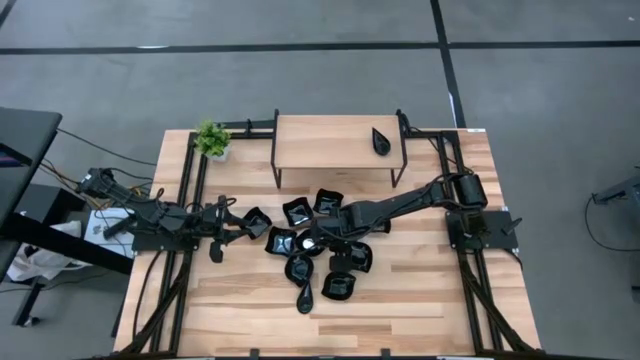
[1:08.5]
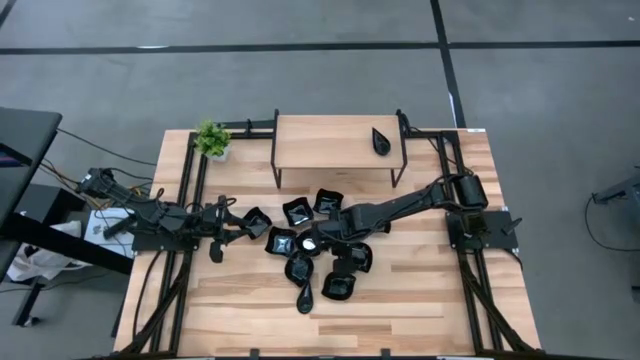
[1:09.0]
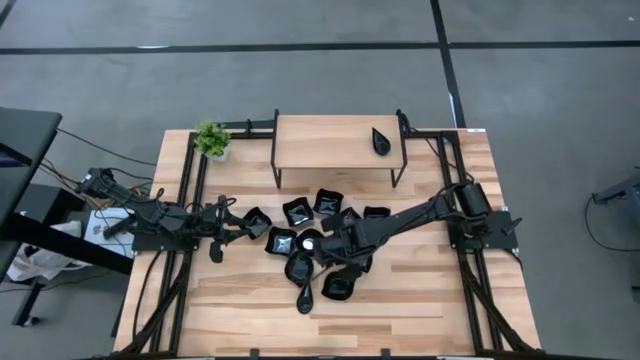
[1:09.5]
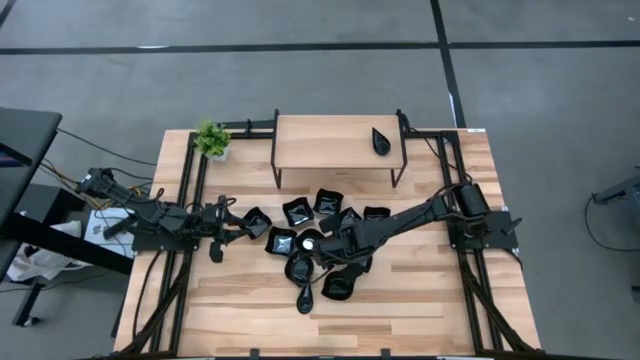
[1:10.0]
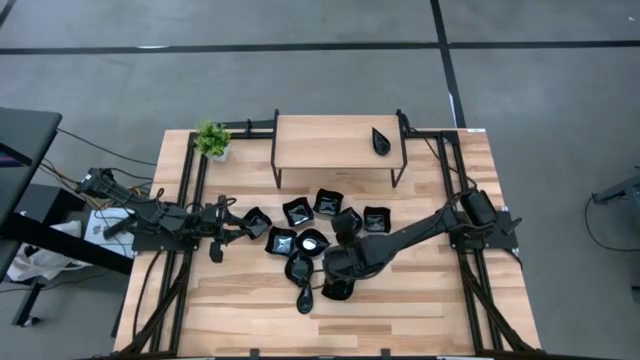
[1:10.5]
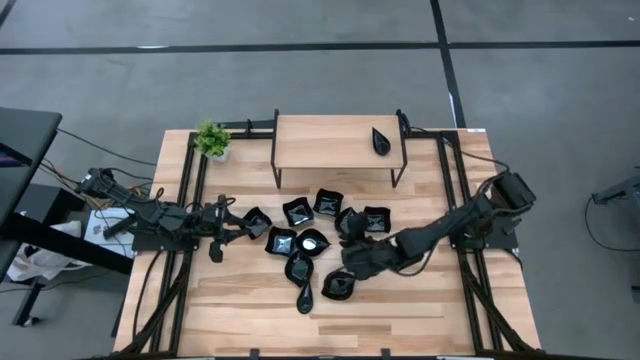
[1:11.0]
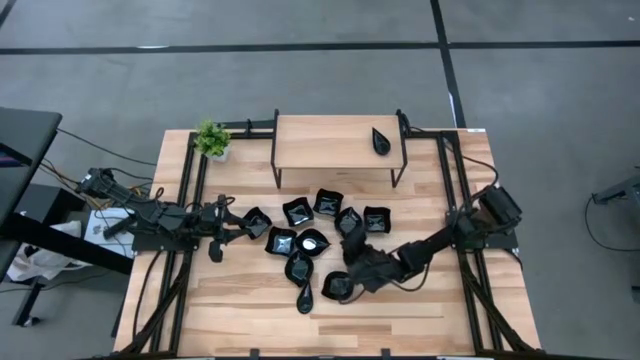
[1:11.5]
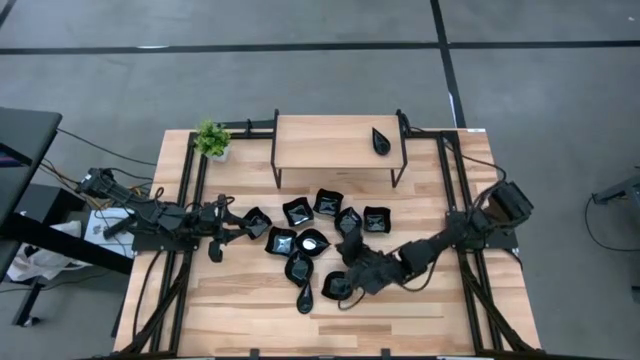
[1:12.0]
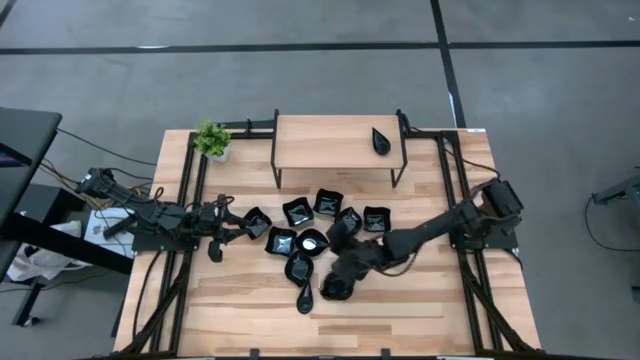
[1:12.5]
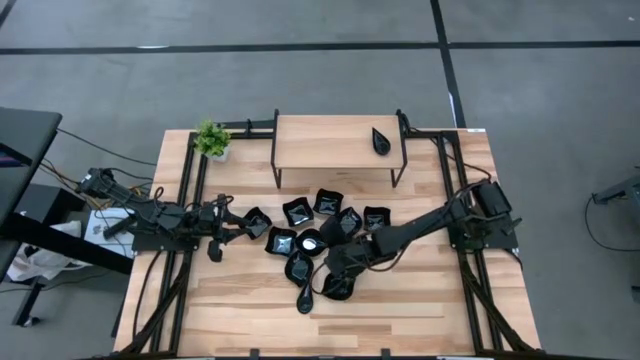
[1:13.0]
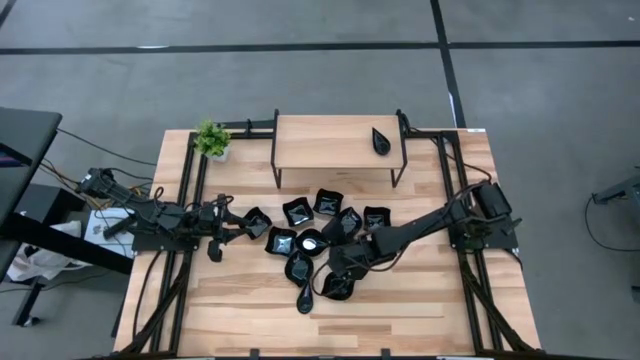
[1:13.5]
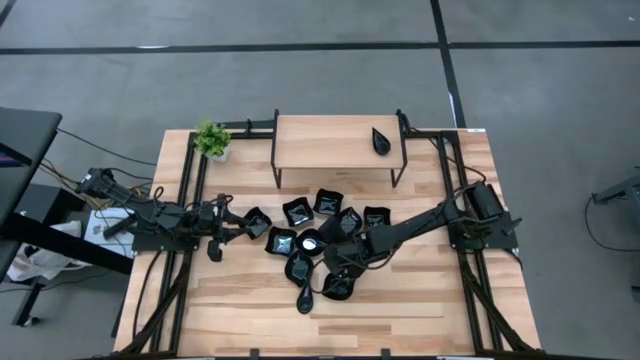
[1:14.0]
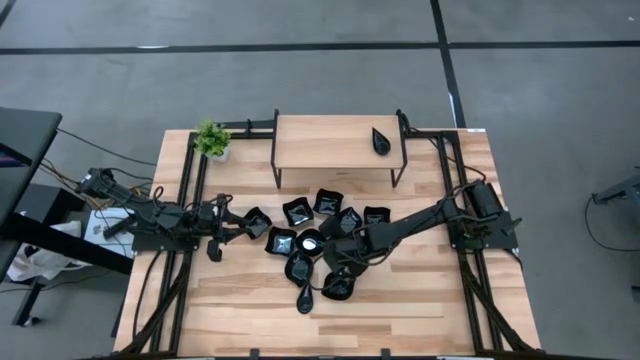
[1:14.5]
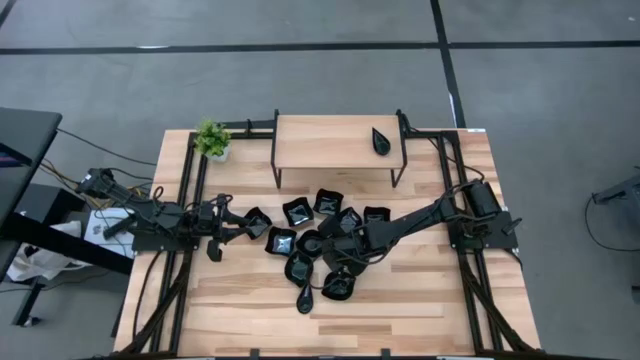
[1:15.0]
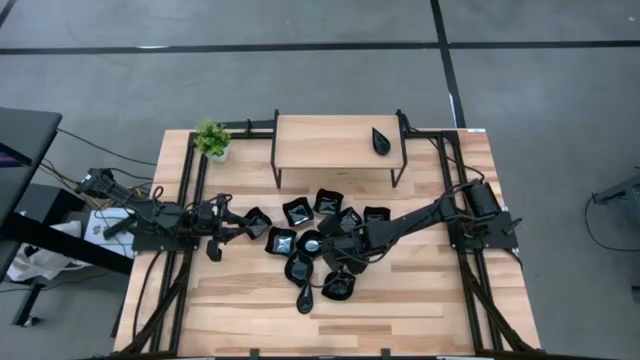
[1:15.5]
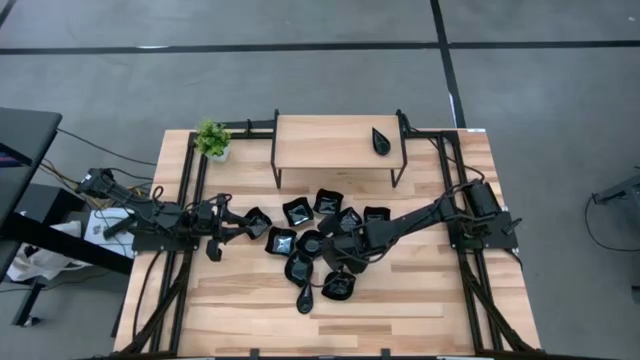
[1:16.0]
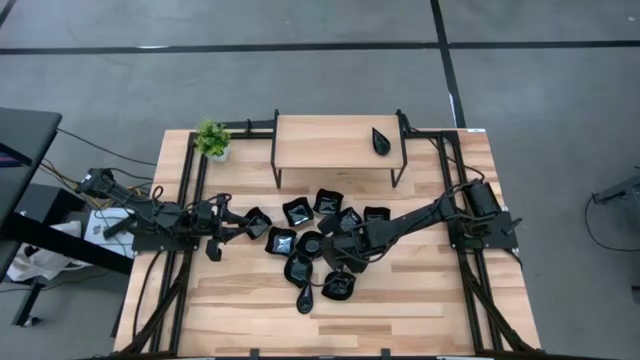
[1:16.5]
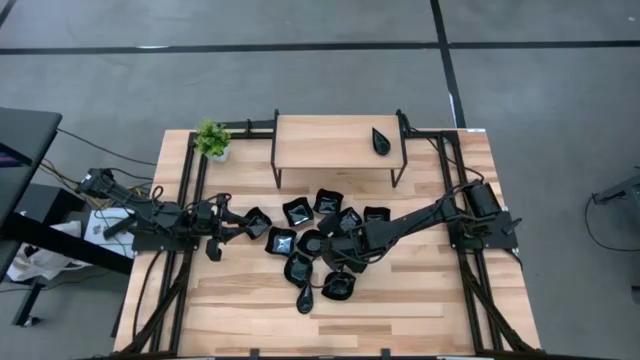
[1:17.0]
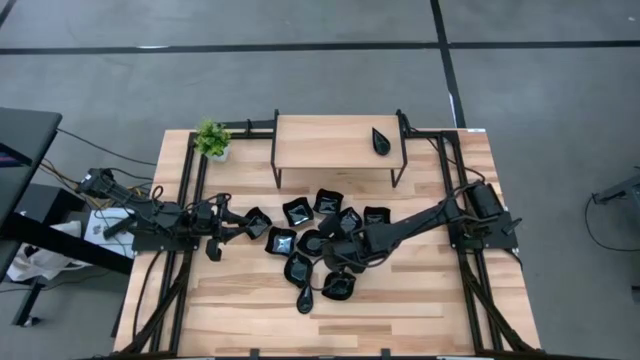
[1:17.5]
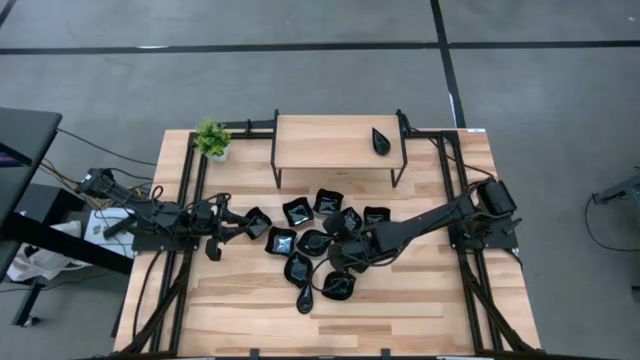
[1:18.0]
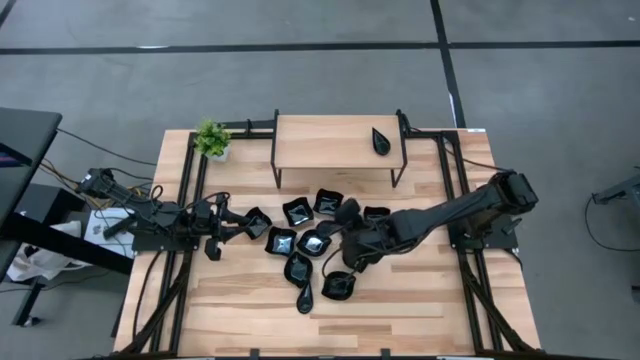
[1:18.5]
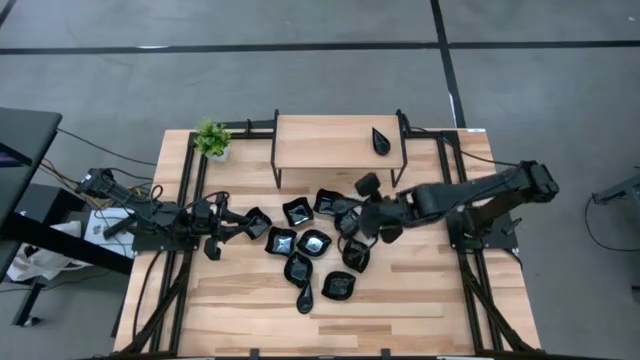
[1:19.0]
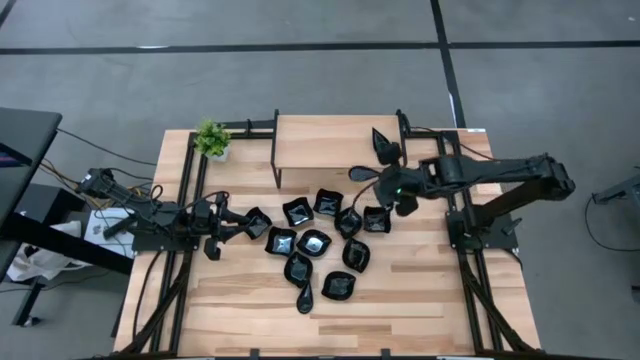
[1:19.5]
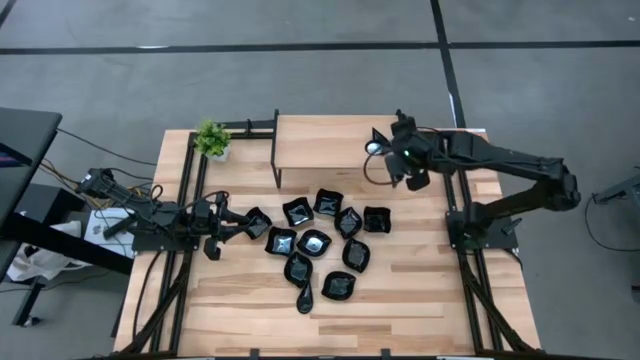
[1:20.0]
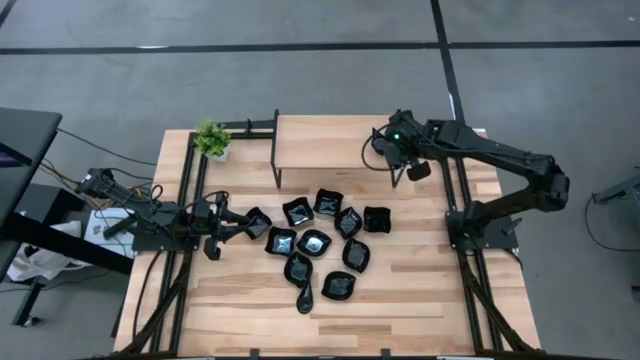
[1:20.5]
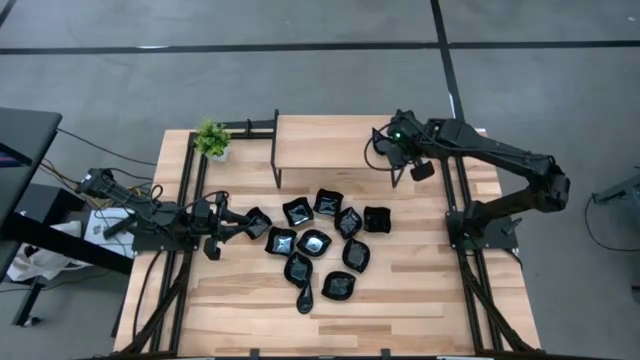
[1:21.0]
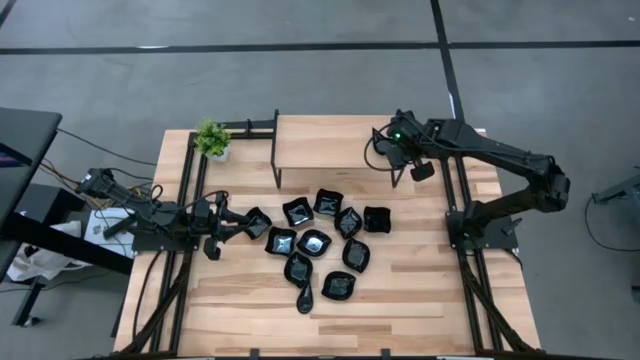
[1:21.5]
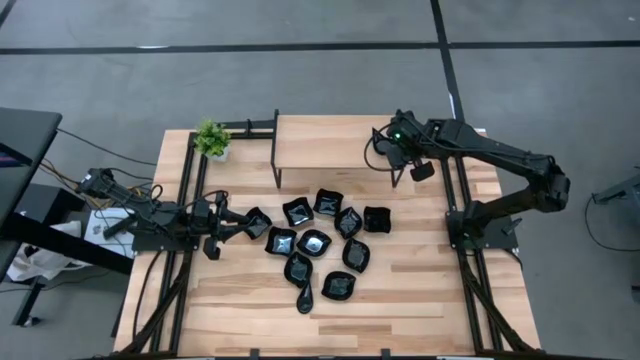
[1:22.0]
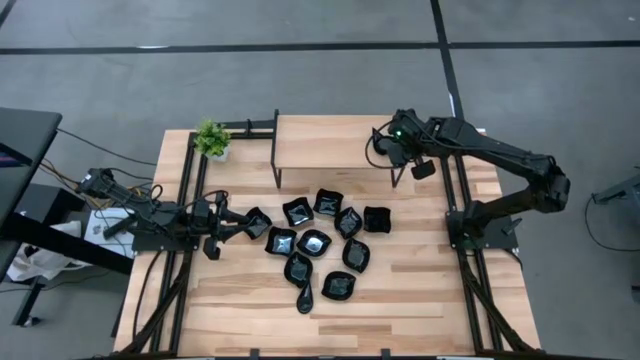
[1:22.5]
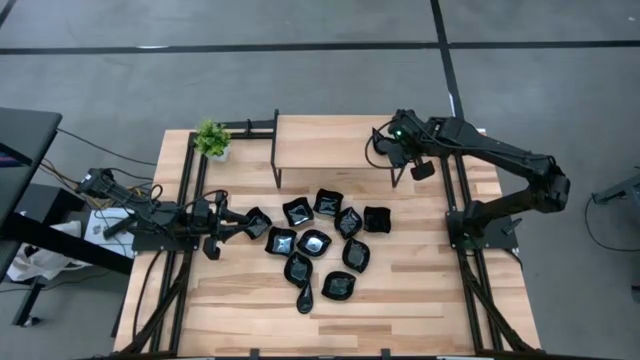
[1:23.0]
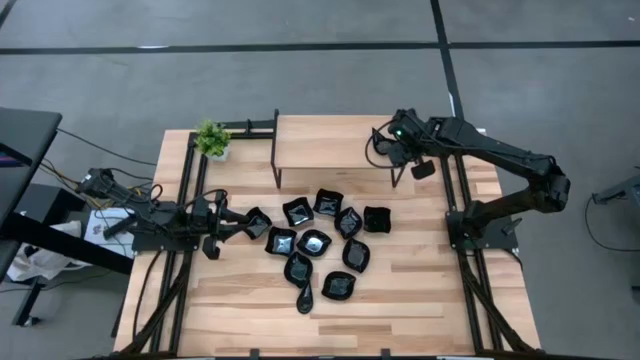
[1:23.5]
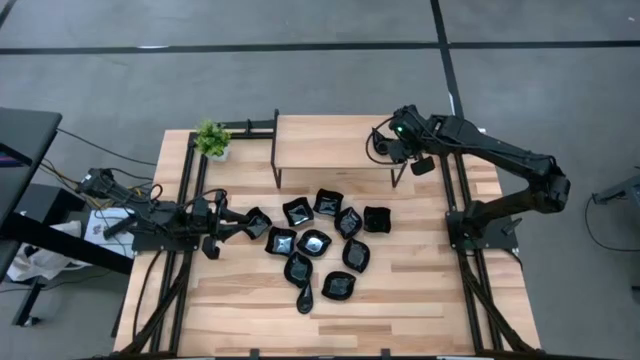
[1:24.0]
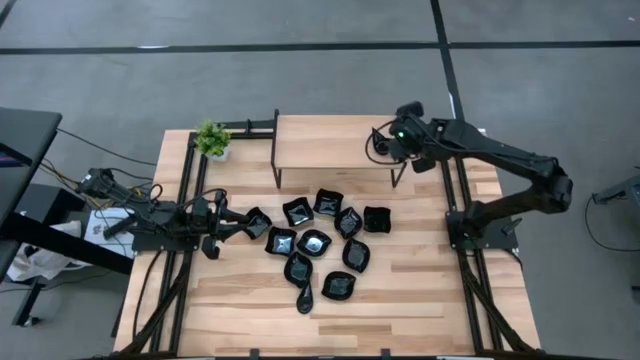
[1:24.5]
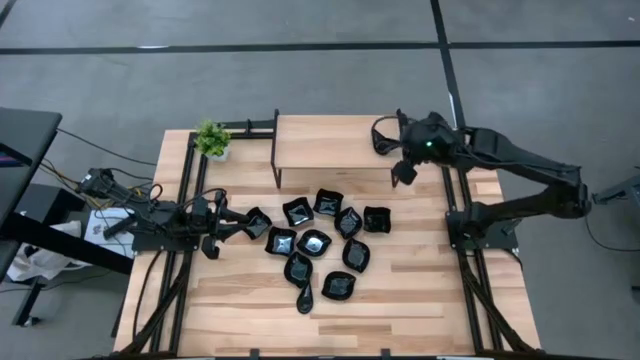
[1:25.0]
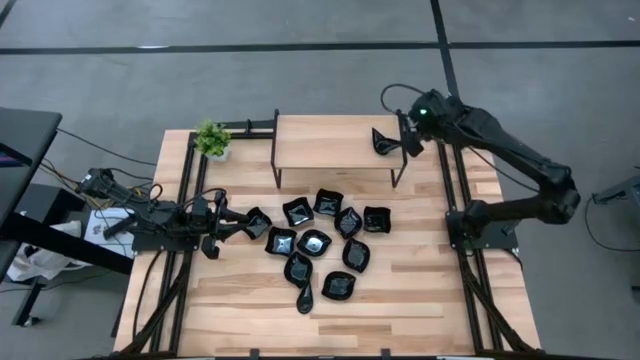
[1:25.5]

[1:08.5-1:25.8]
Task: Pick & Place Mini shaped plates
Stack the black drop shaped plate on top of the black drop shaped plate on the shelf

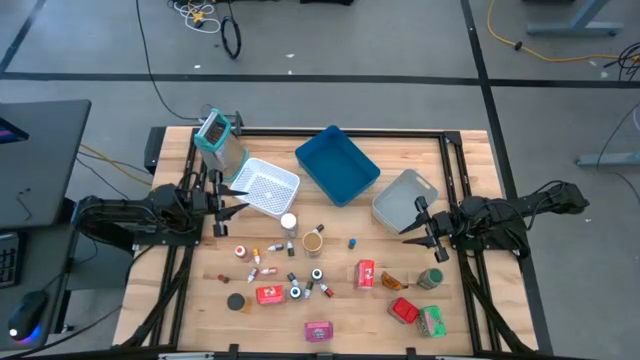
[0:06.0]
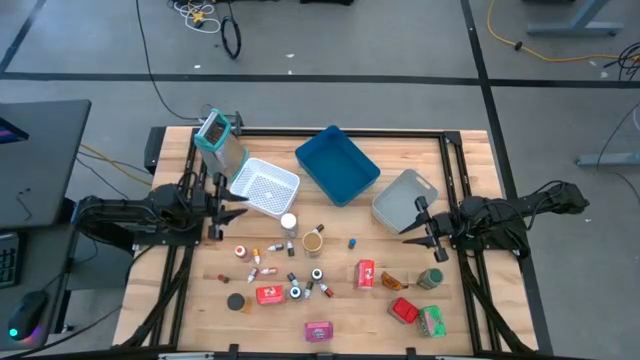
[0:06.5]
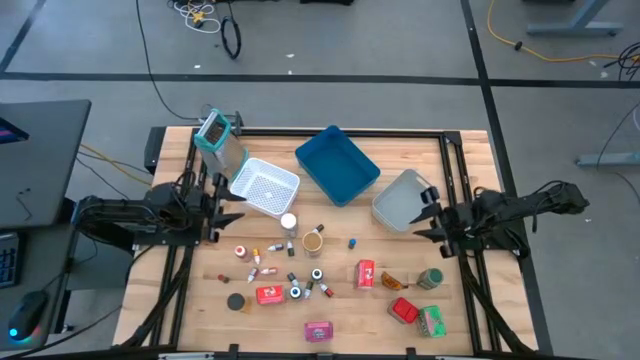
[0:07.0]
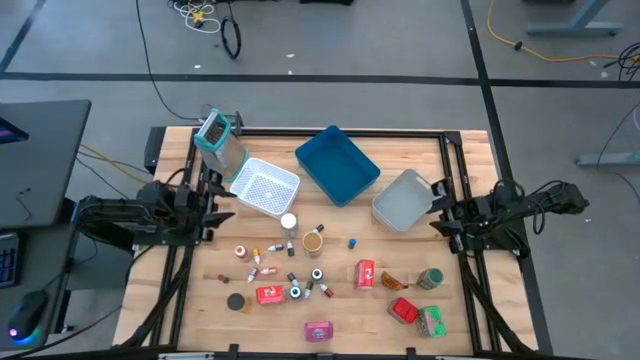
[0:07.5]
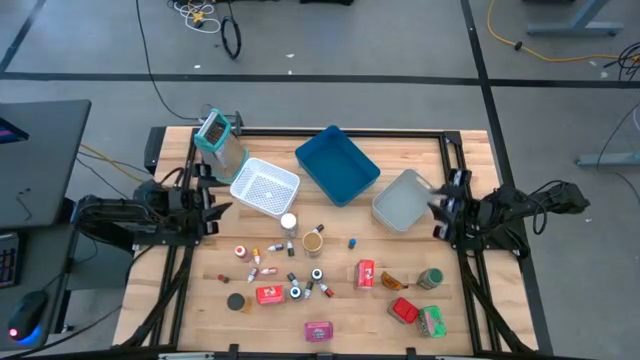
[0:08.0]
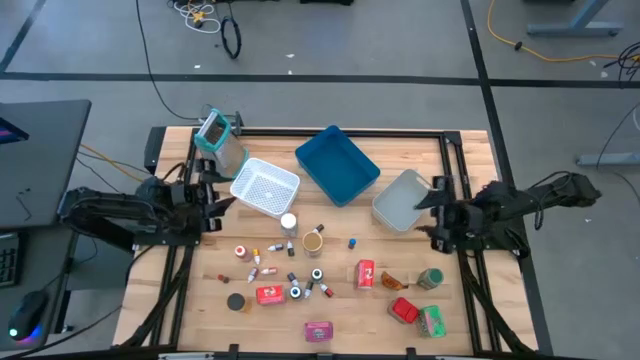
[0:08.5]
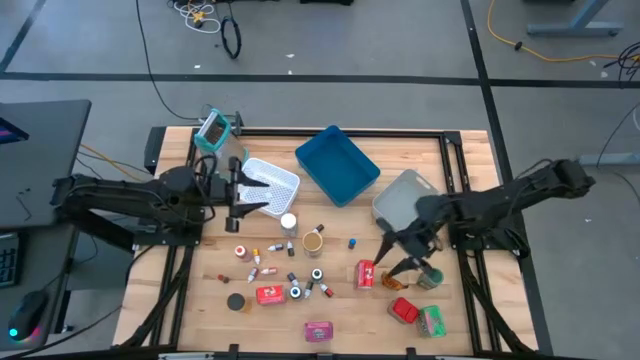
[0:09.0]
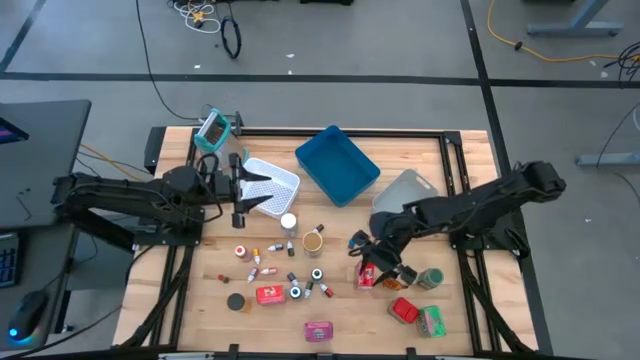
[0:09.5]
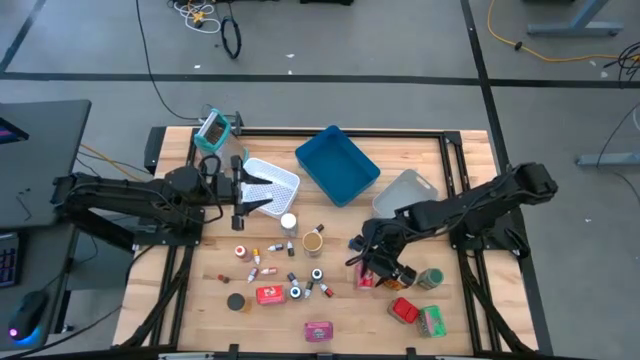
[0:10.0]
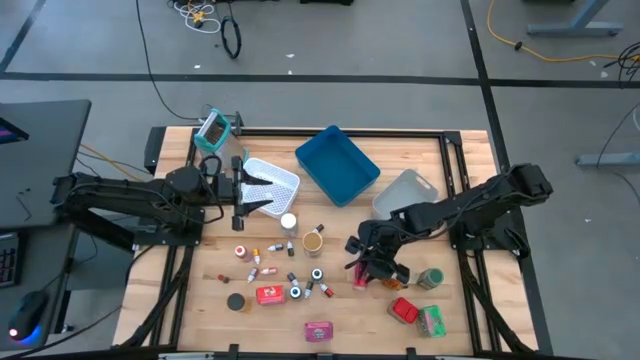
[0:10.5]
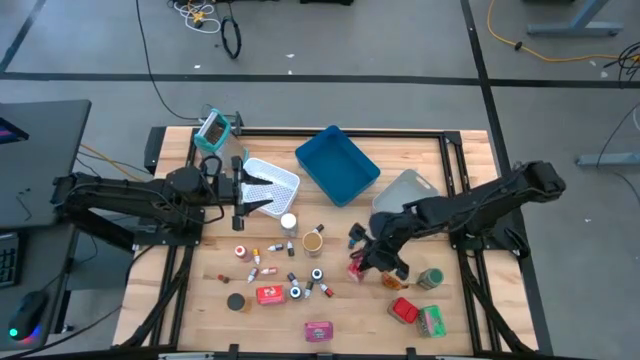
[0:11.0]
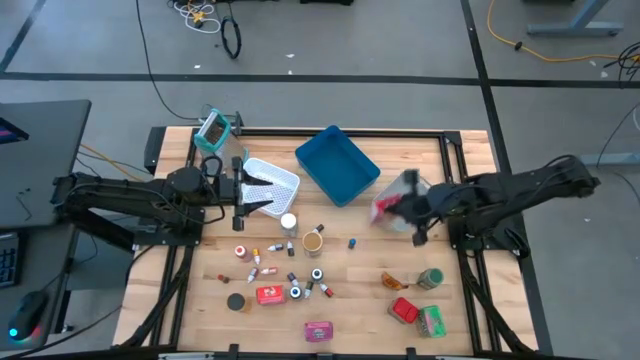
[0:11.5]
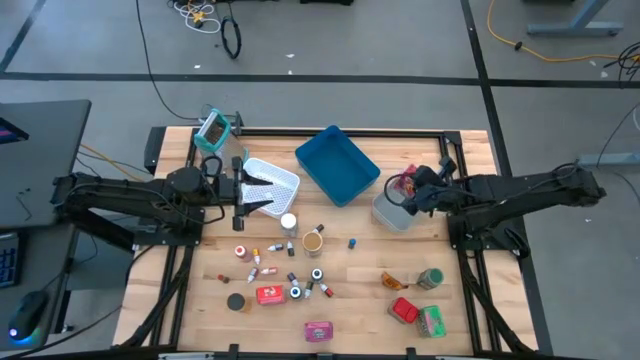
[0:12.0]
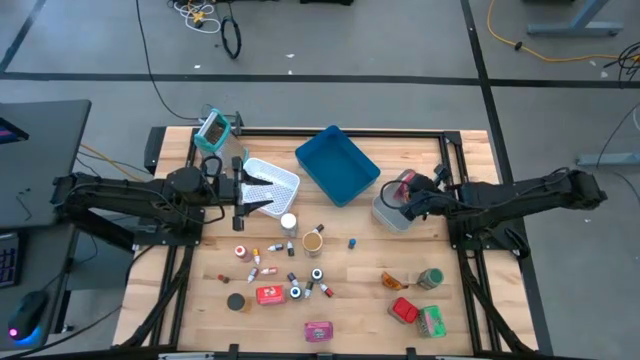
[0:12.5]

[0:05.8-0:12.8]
Task: Pick & Place Kitchen Items
Put the red cereal box into the gray bin
